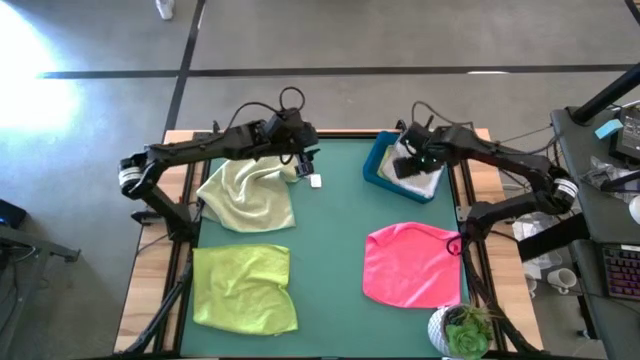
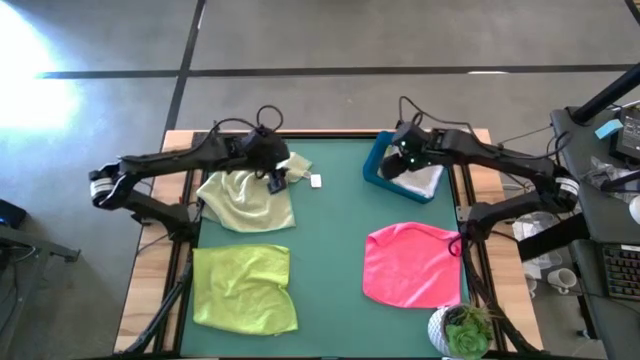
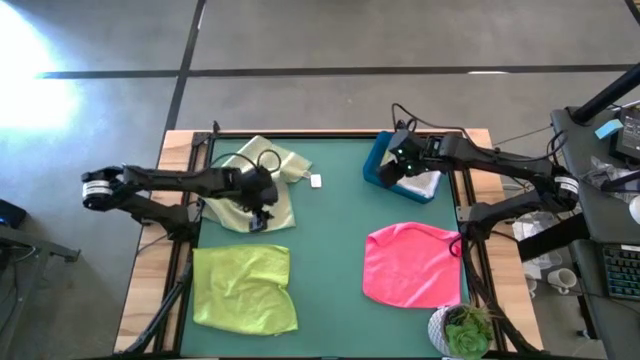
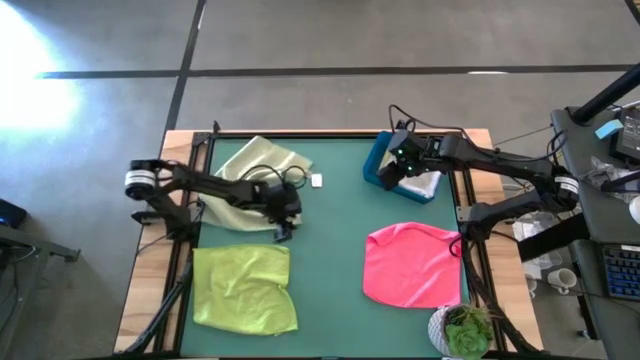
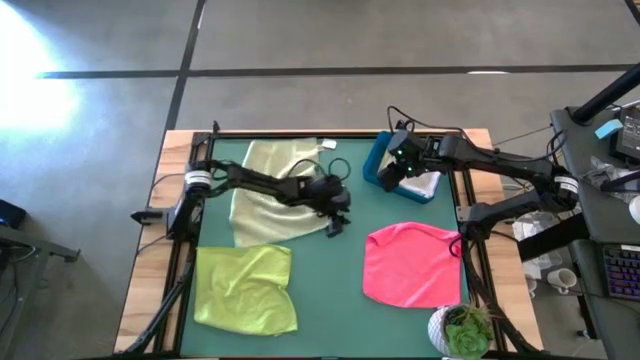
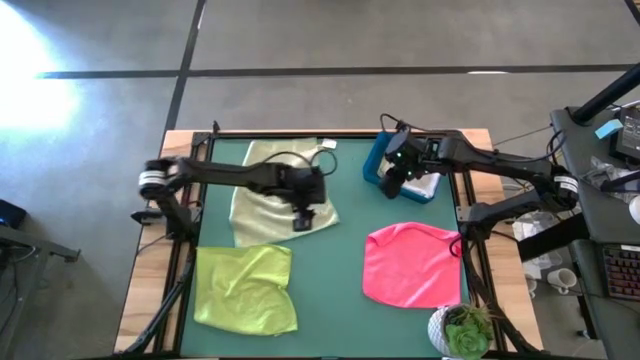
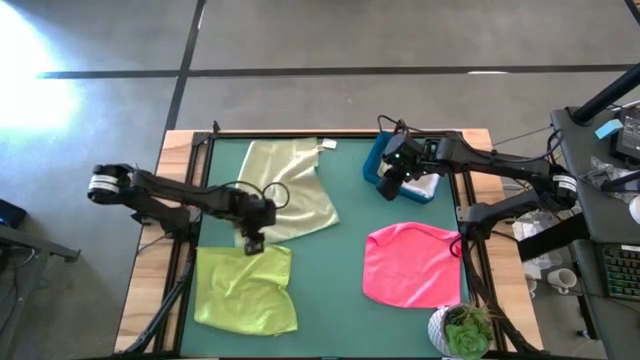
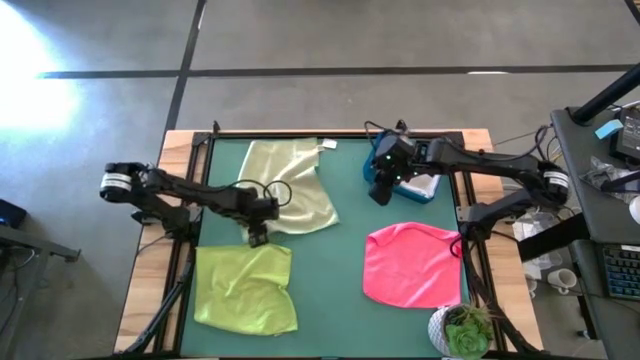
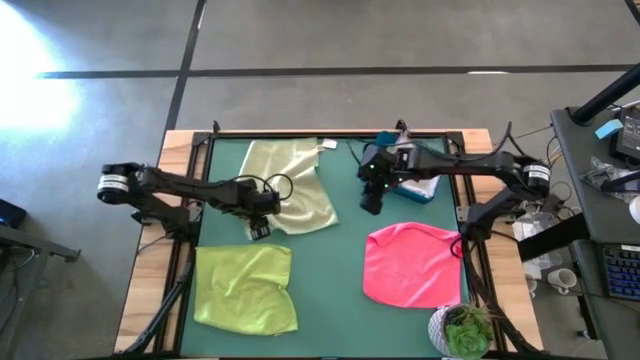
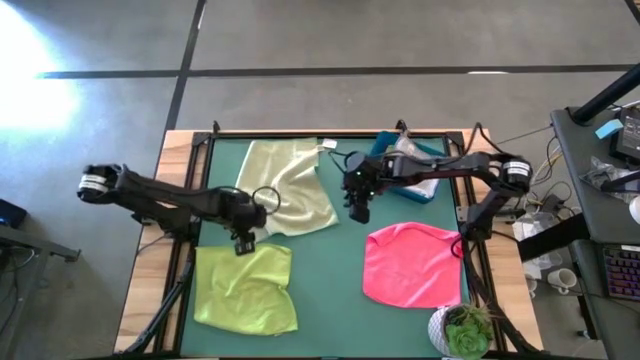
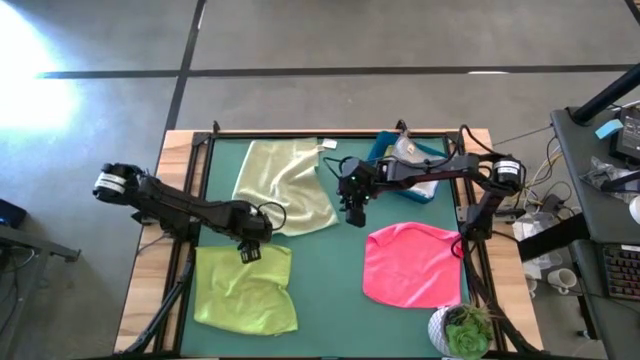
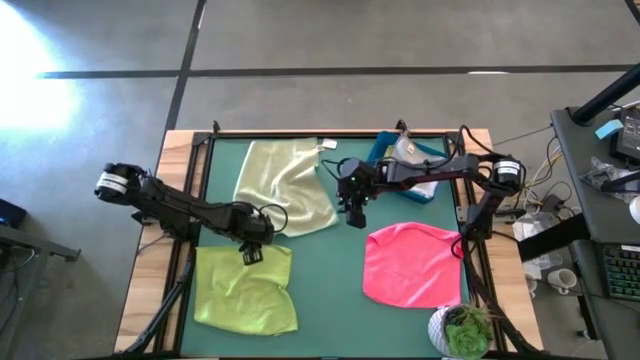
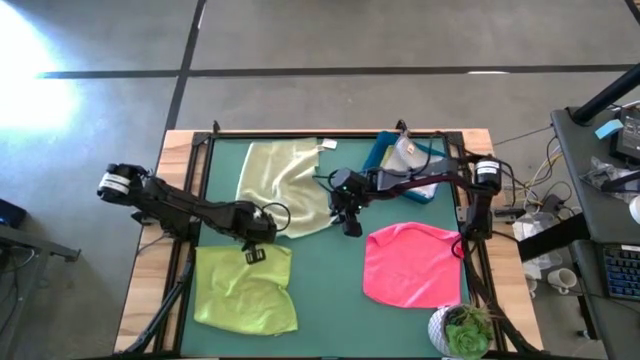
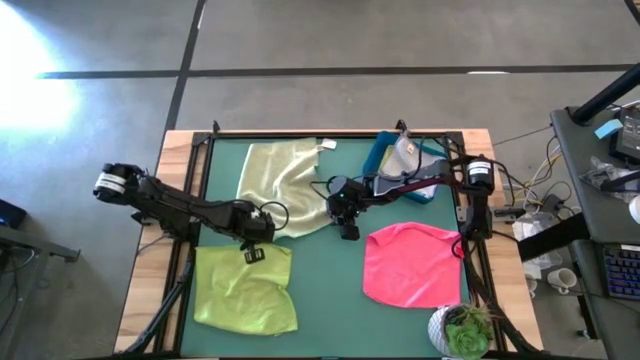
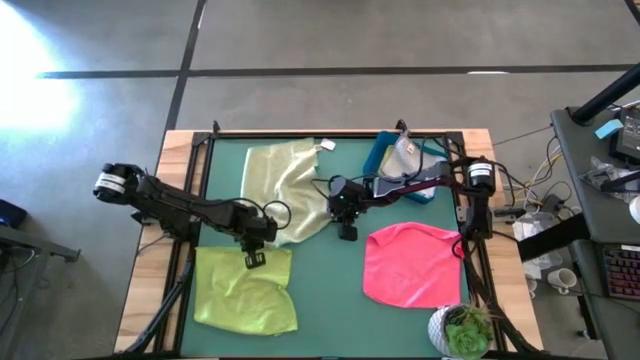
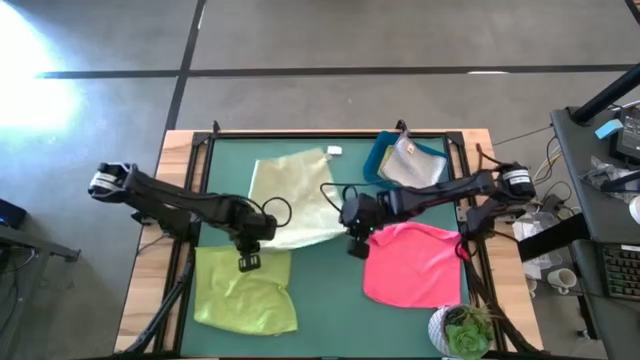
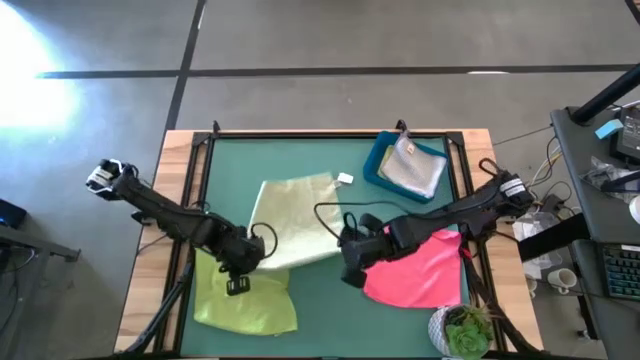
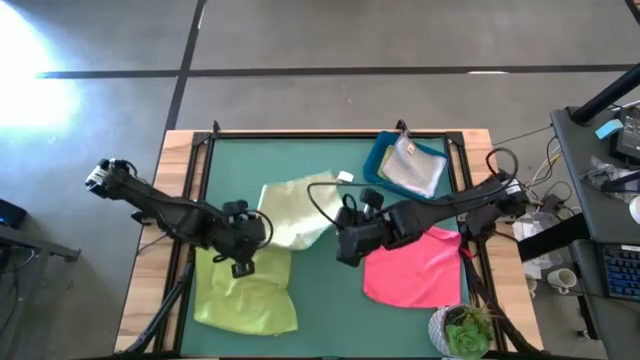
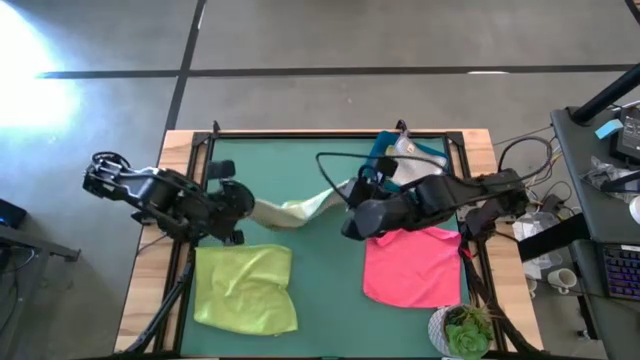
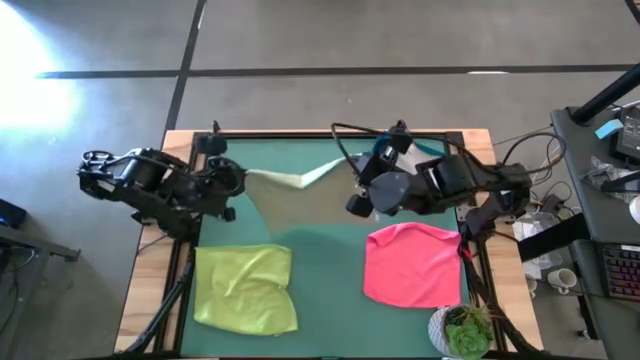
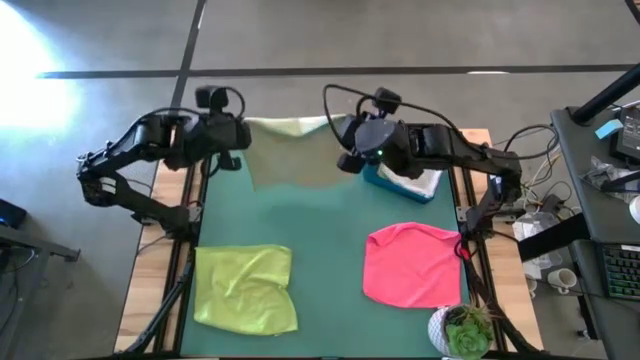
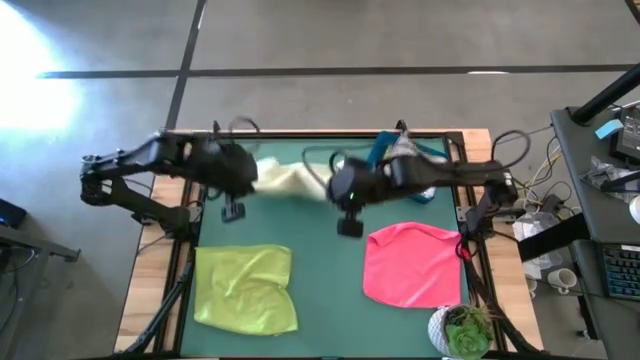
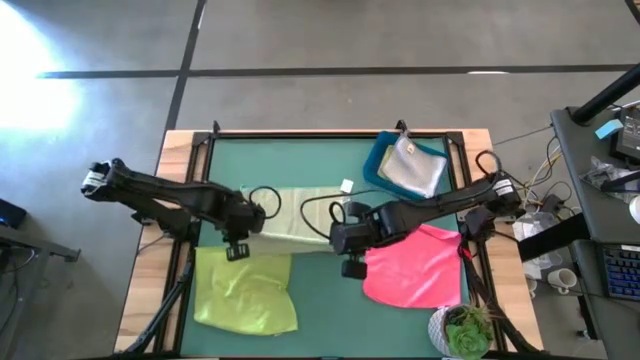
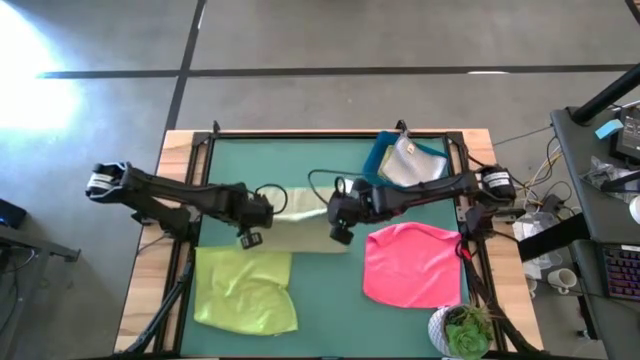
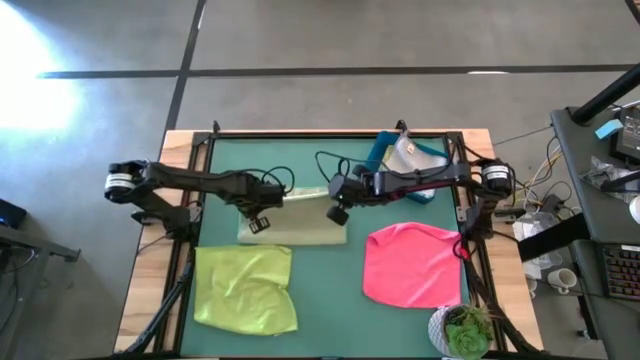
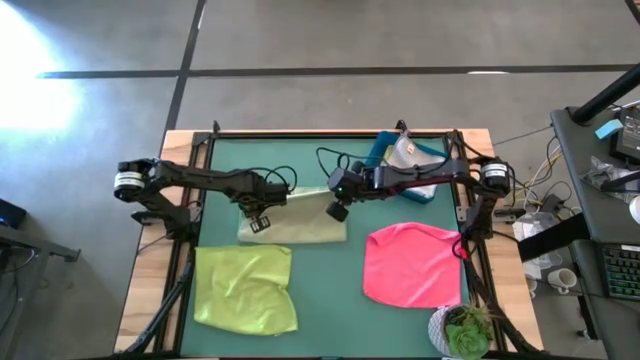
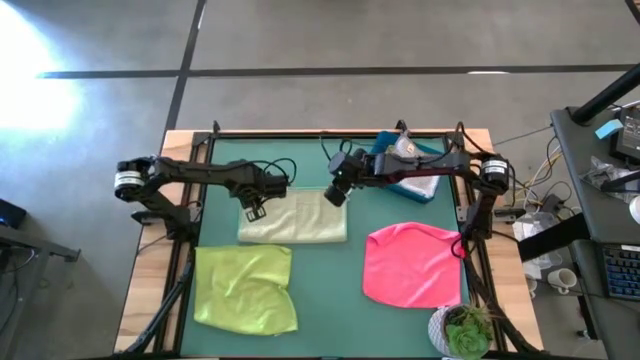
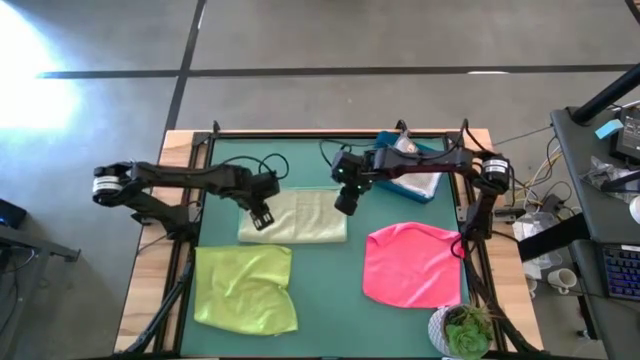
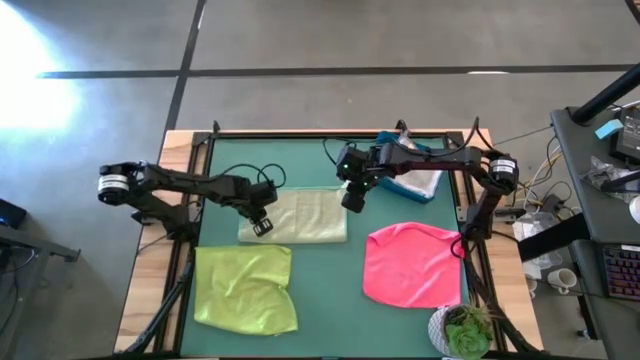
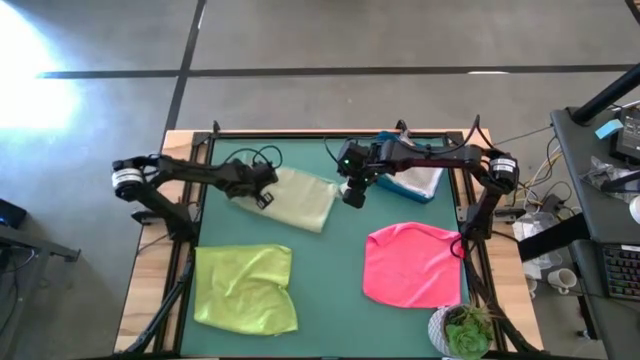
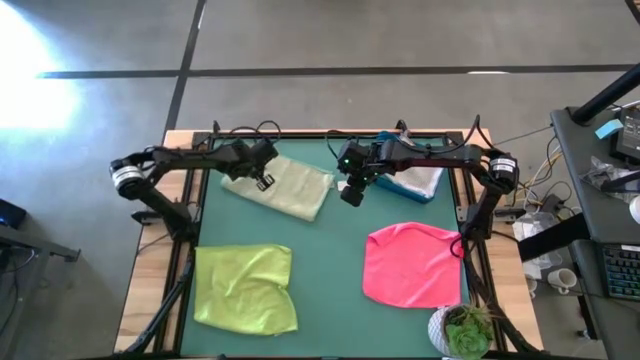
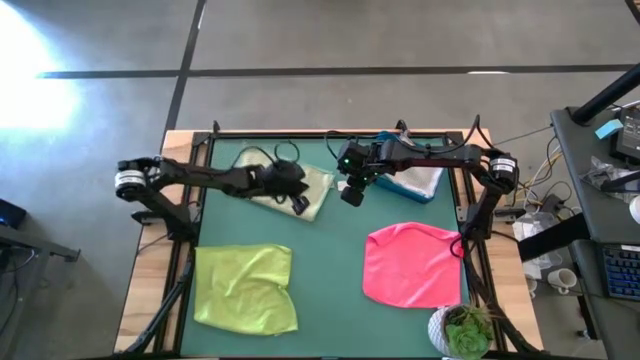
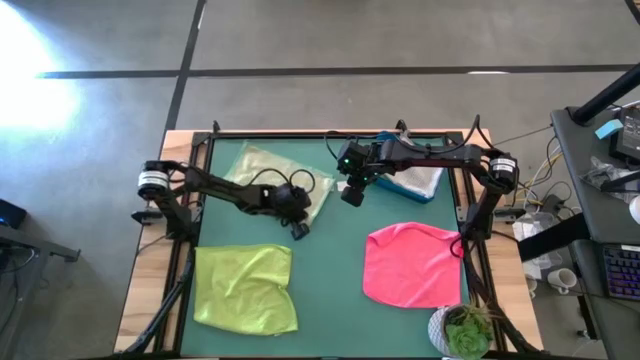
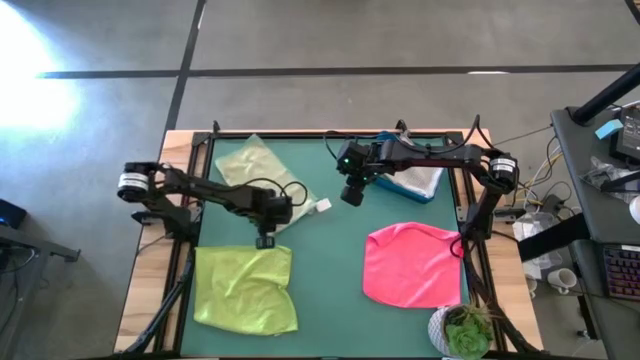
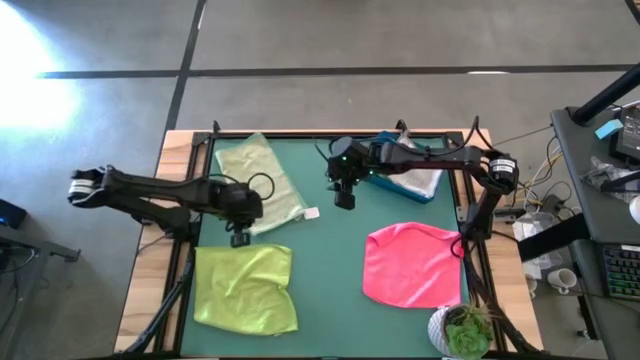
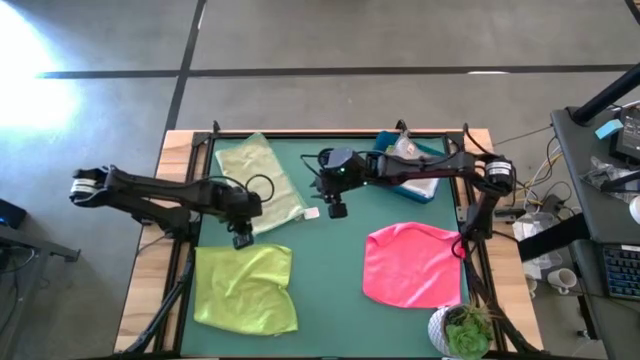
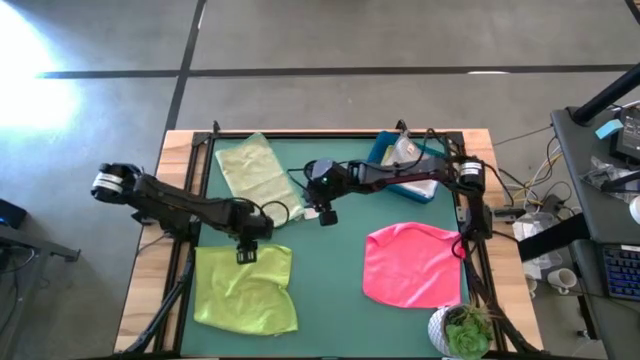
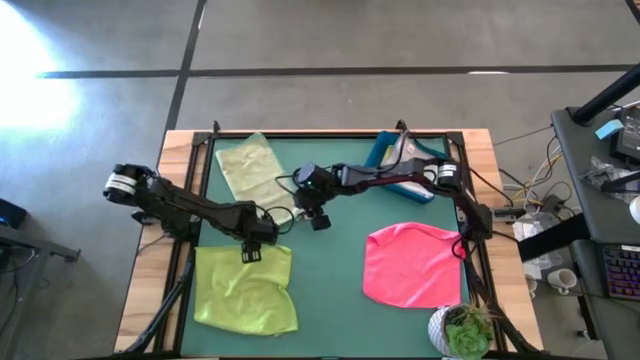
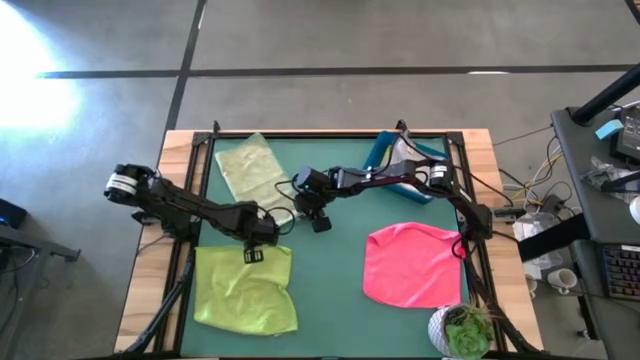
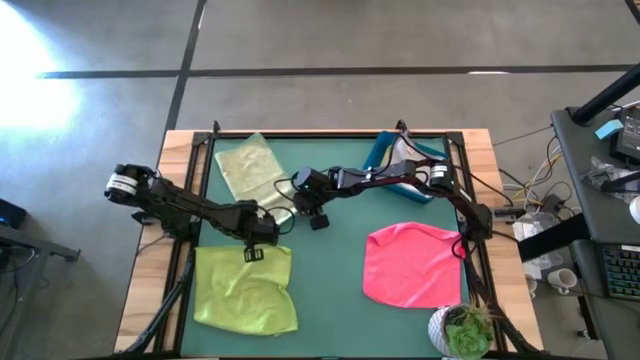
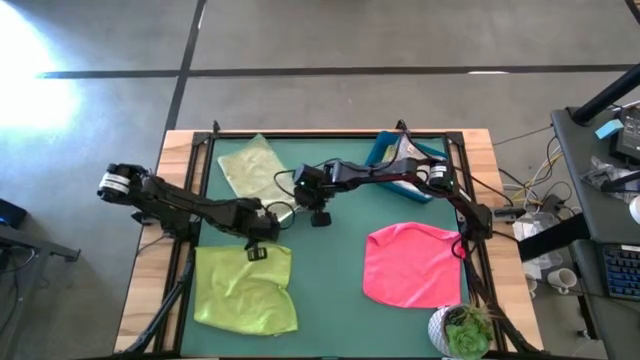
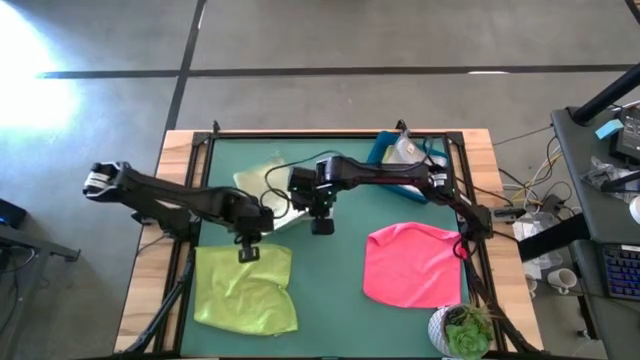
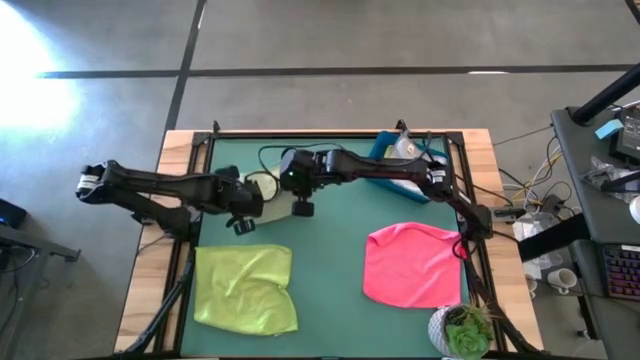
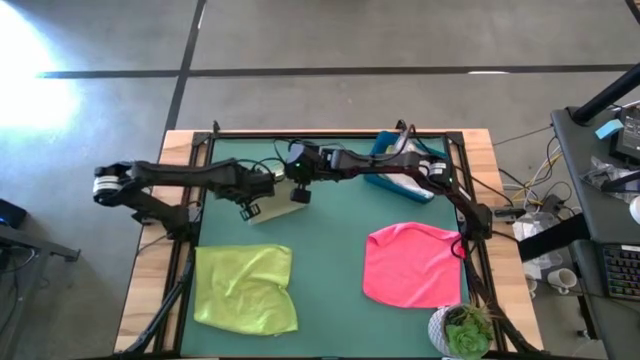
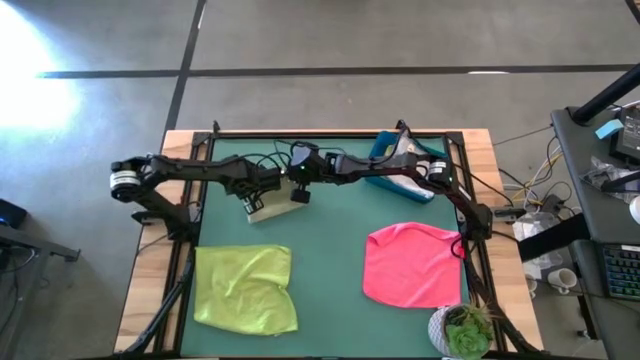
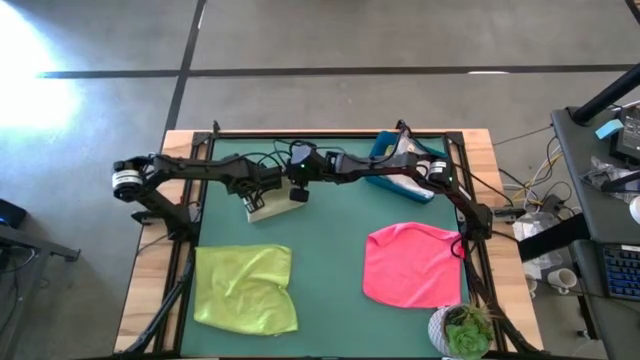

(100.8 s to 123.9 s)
Task: Fold microfiber towels
Fold the light green microfiber cloth
